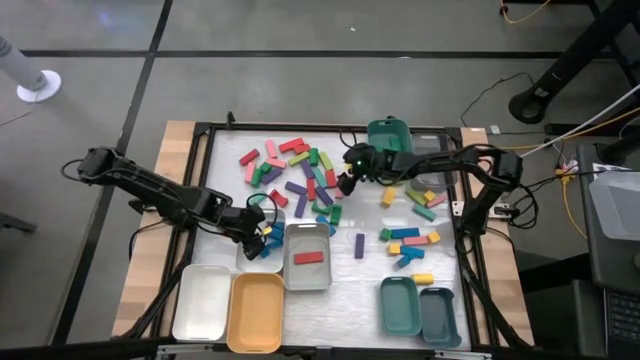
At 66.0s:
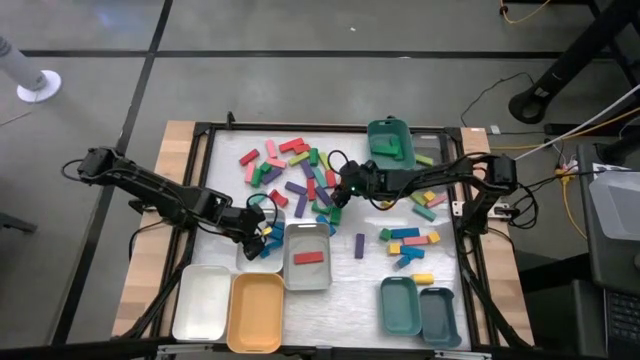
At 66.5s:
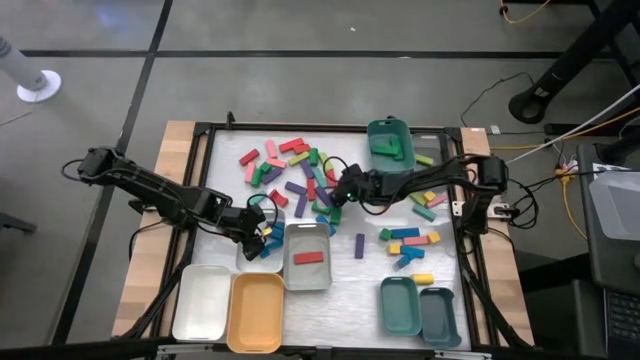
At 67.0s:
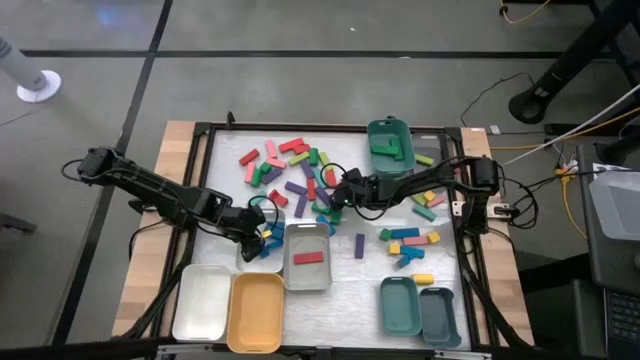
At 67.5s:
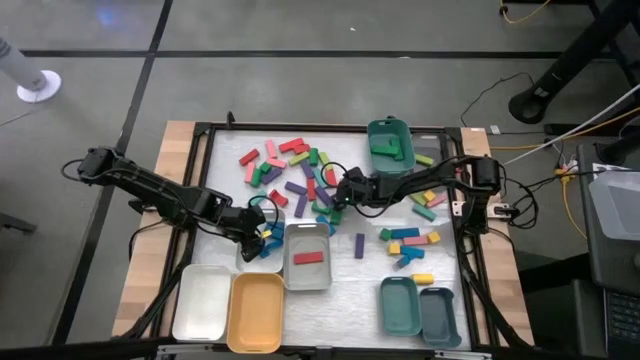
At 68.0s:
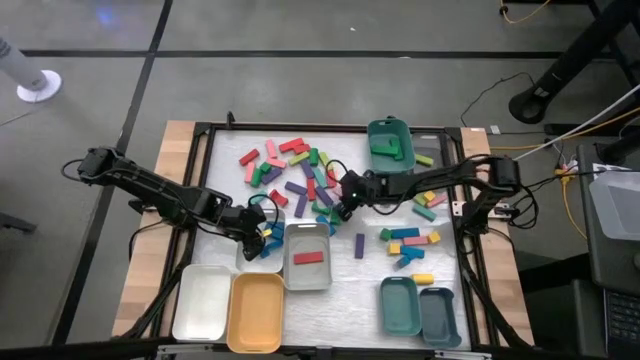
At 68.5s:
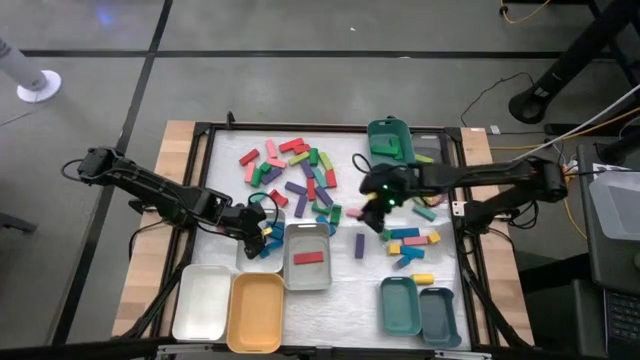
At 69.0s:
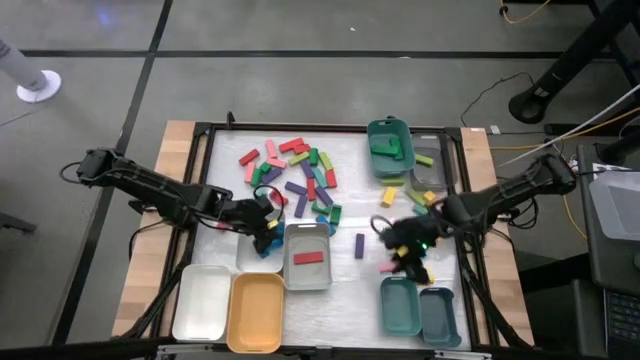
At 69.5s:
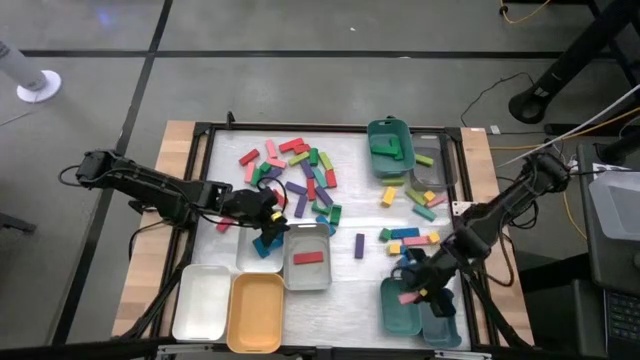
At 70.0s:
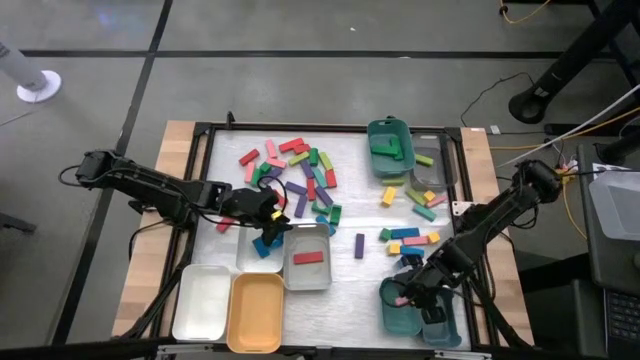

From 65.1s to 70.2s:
Task: Sort blocks
Put the pink block into the bottom green bin

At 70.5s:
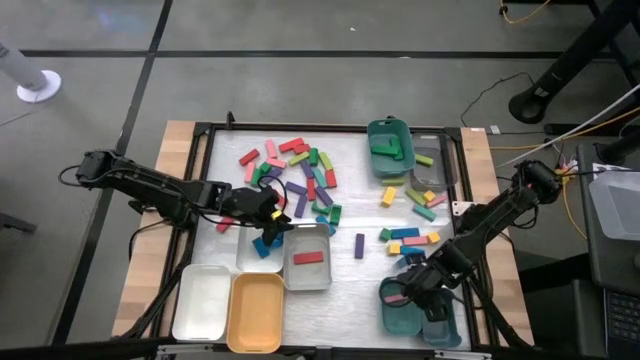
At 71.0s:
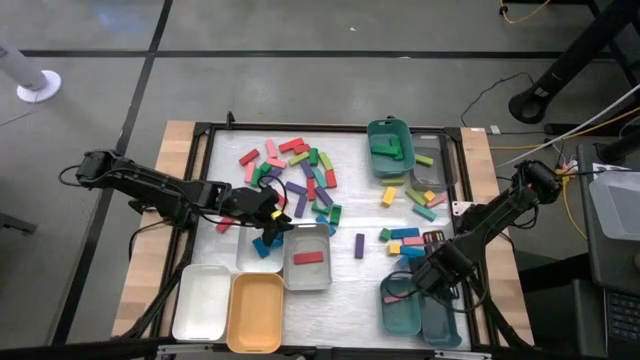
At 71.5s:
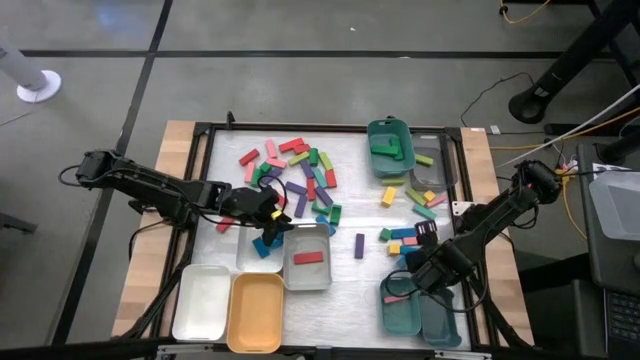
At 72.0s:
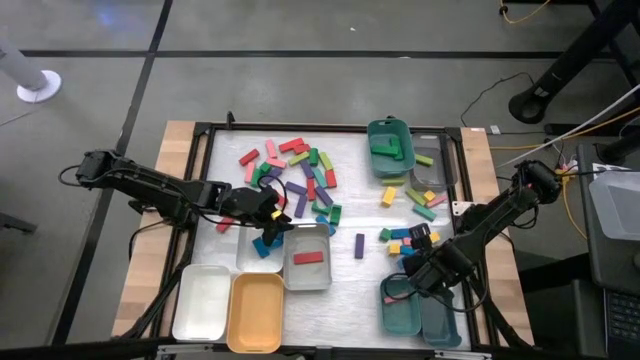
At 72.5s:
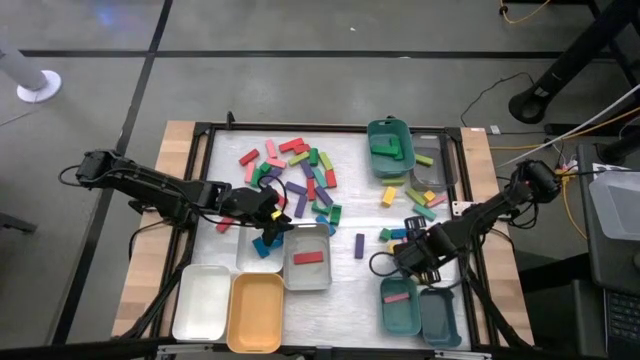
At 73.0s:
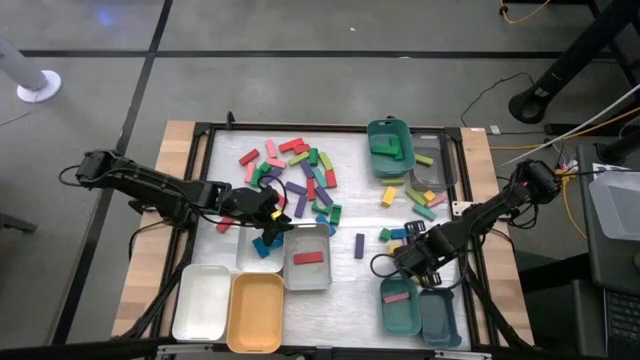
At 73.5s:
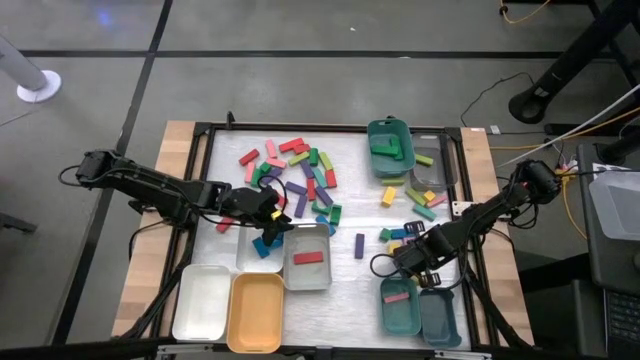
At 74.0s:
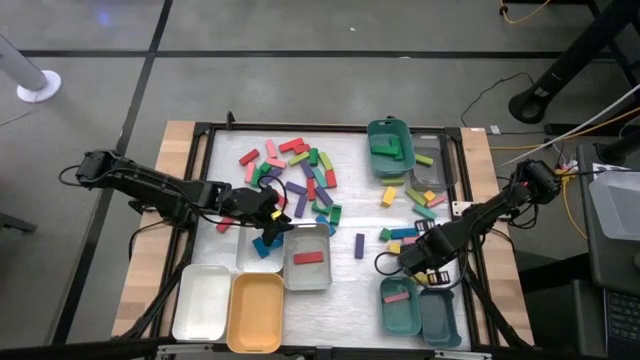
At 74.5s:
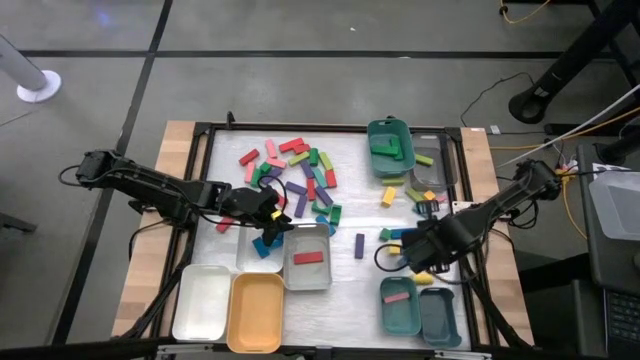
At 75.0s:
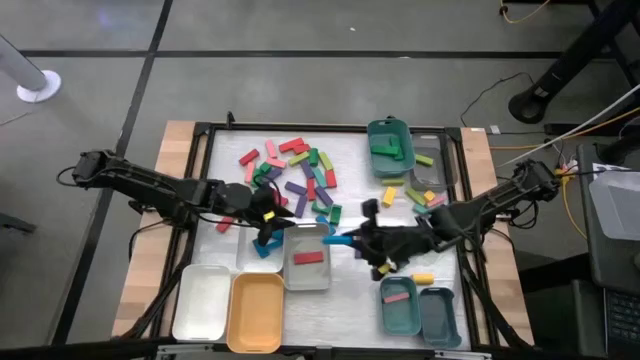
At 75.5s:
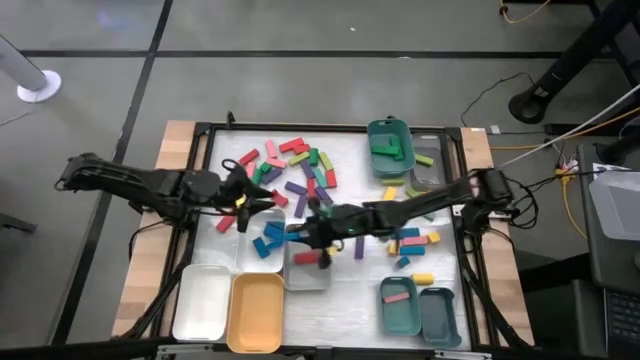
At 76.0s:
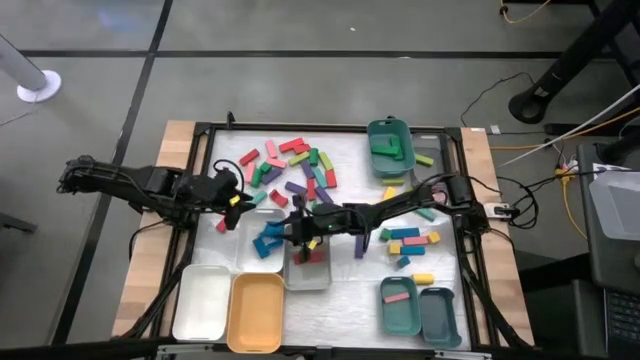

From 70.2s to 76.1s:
Put the blue block into the top white bin

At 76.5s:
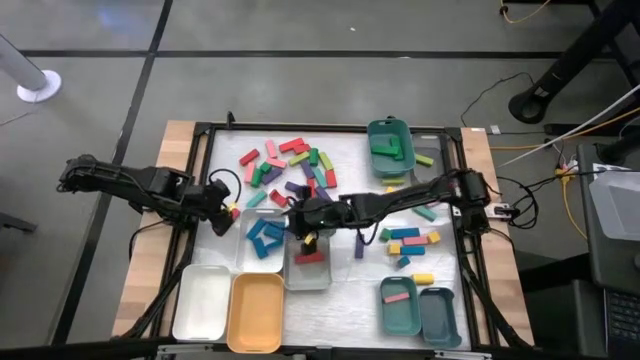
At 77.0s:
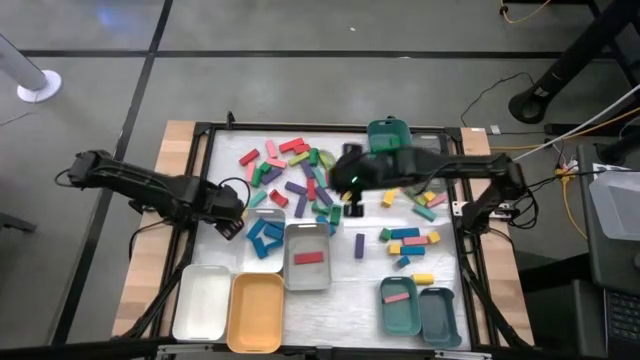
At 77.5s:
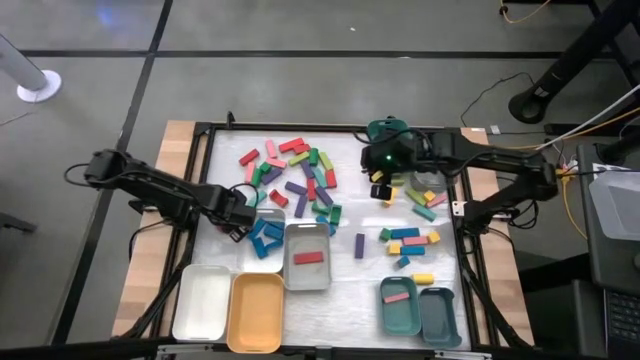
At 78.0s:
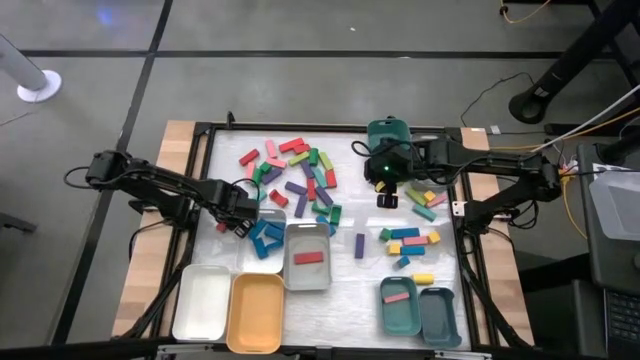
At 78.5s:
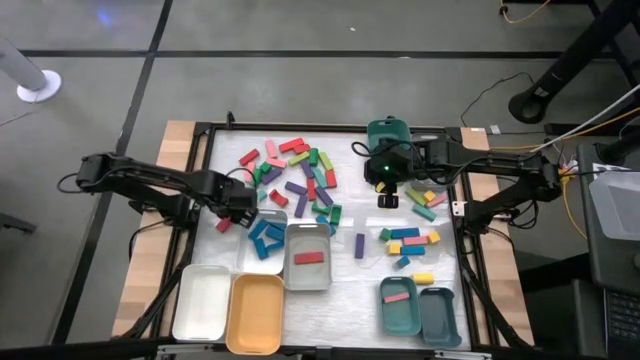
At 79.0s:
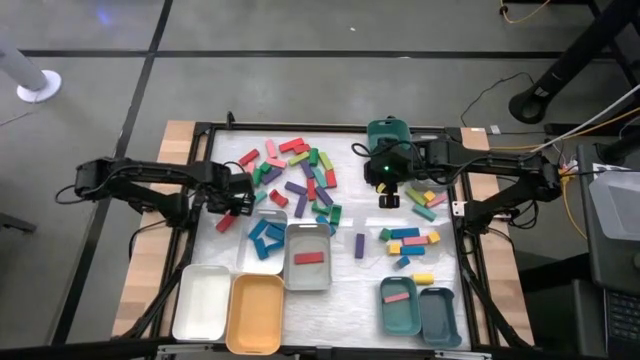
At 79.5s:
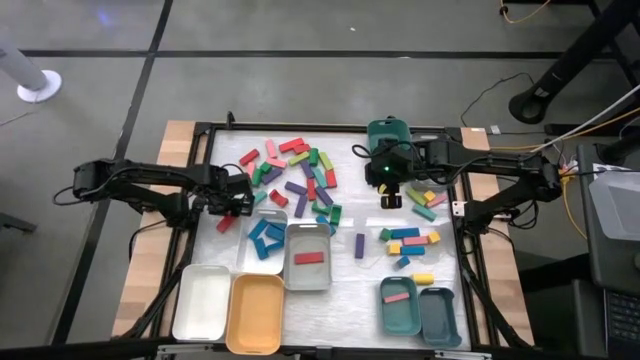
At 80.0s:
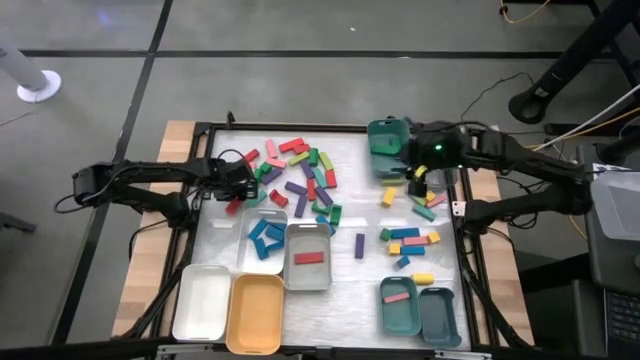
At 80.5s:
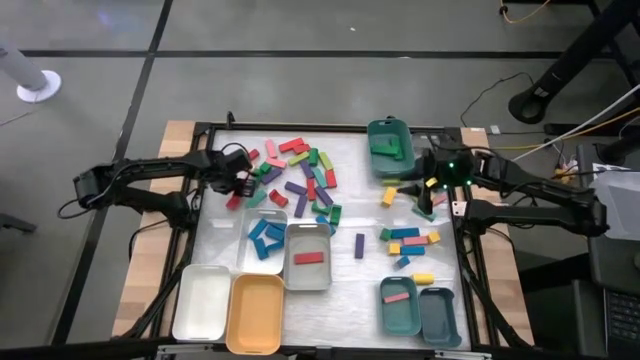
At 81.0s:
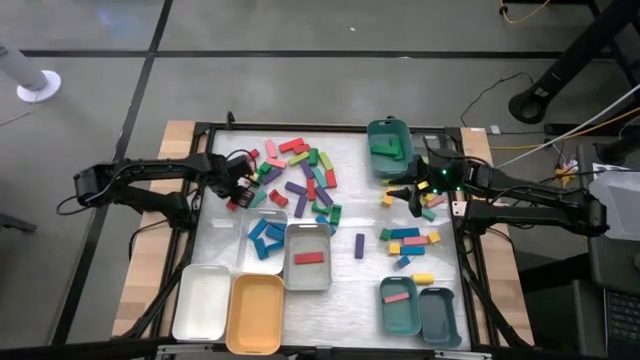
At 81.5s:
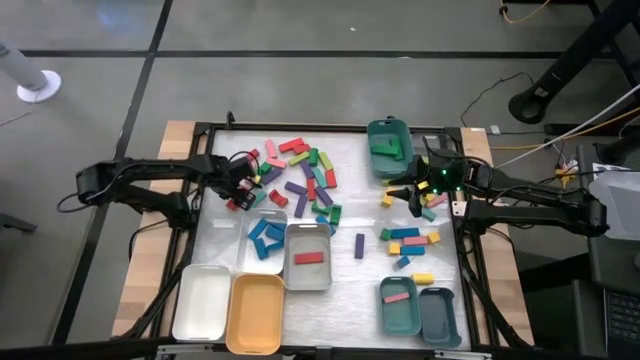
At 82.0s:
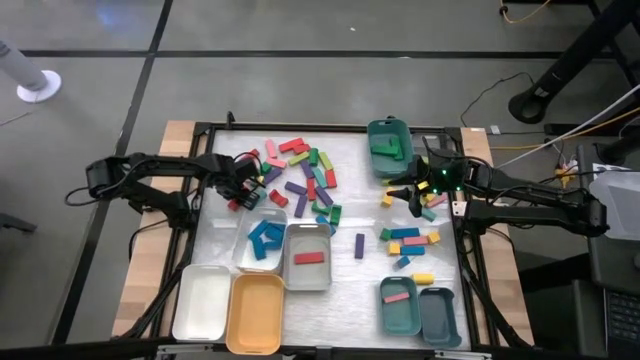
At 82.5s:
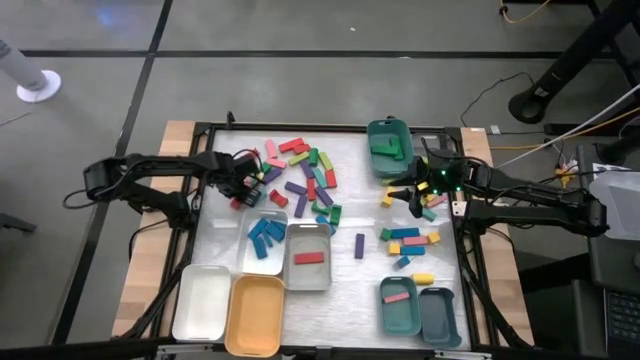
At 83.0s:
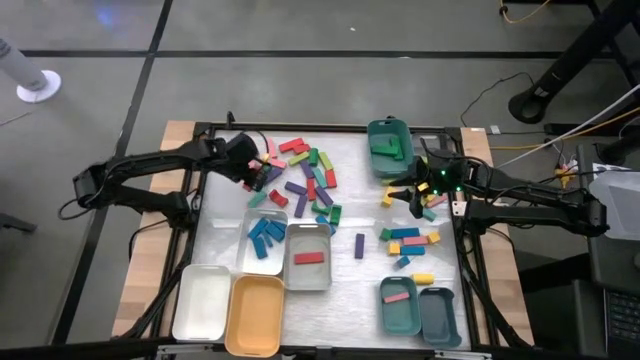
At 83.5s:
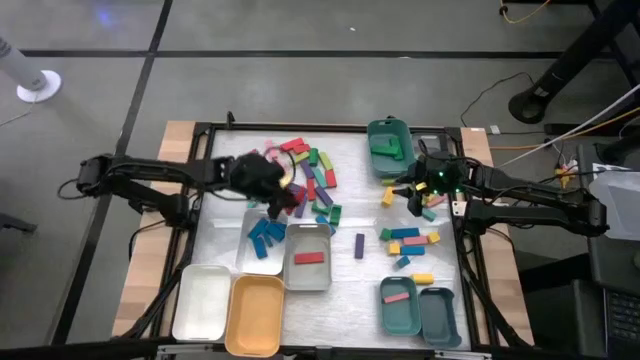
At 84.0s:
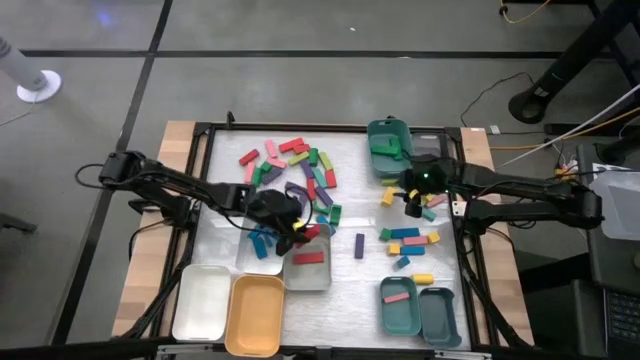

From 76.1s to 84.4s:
Put the red block into the gray bin

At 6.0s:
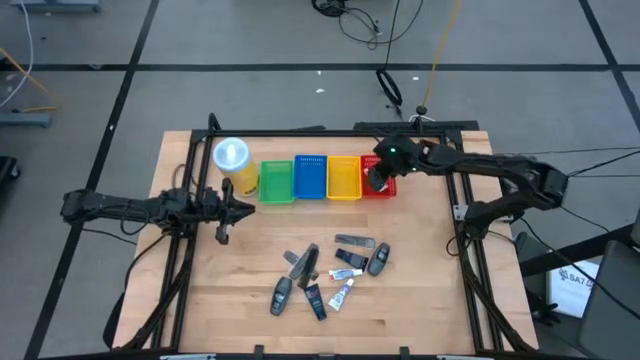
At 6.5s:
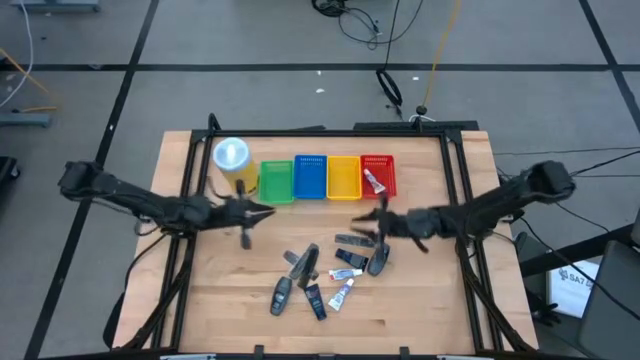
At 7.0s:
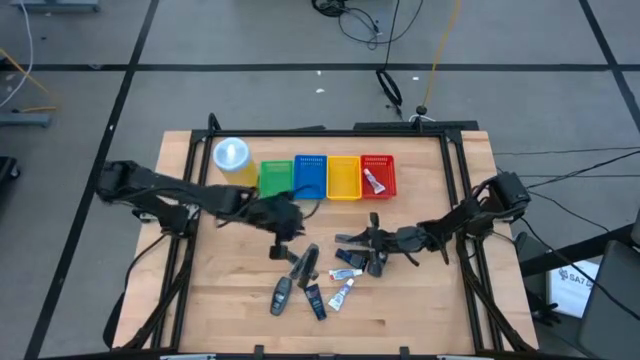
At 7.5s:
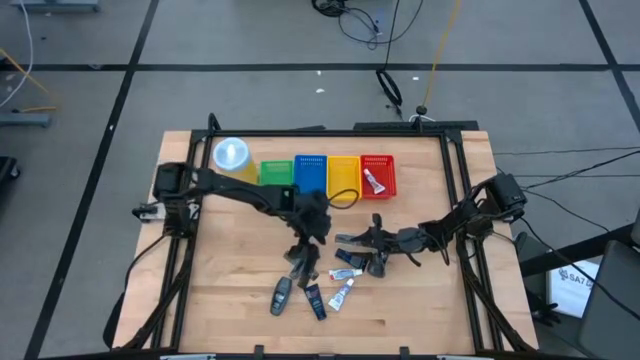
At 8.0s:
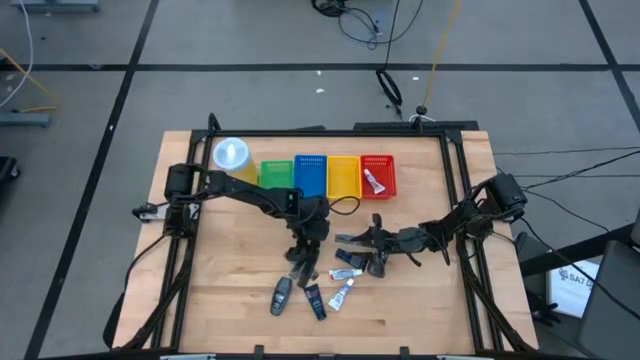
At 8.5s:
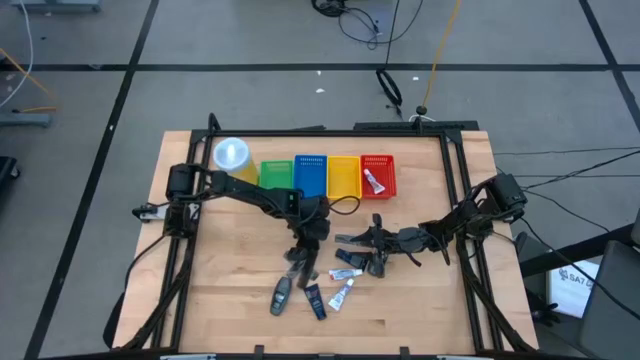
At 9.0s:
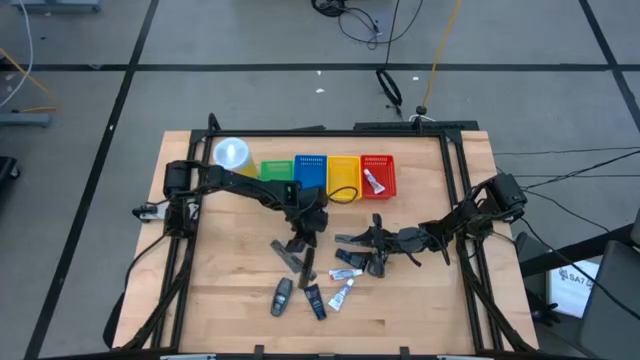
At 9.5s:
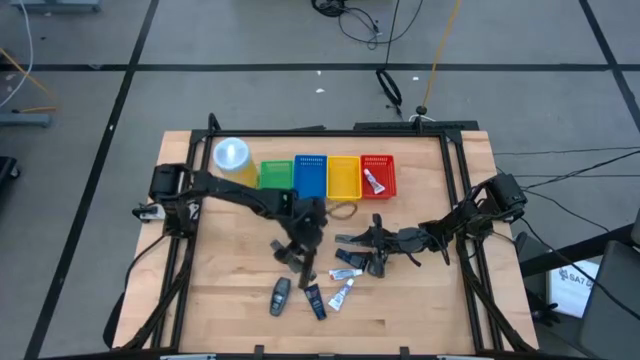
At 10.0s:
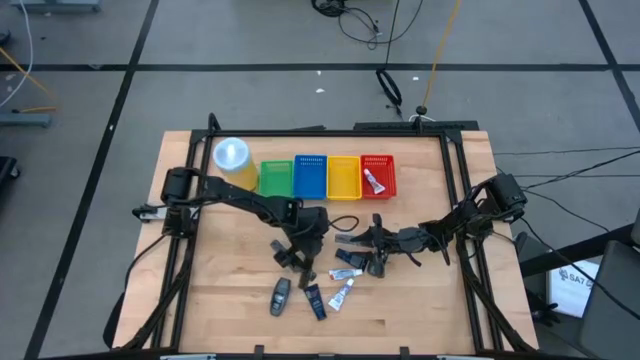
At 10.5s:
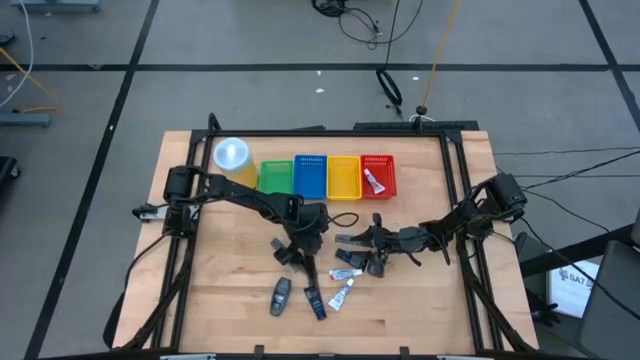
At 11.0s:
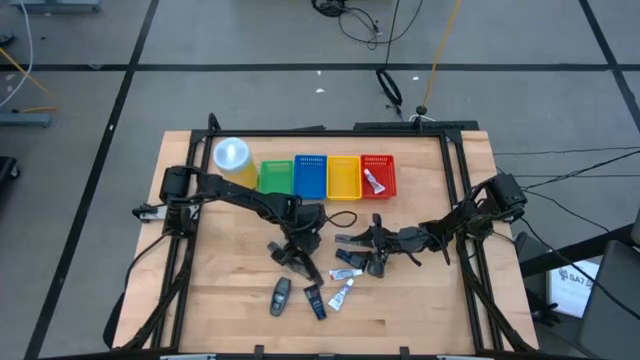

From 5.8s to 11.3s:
Task: Pick & Place Travel size toiletries
Put the hair comb into the blue bin
